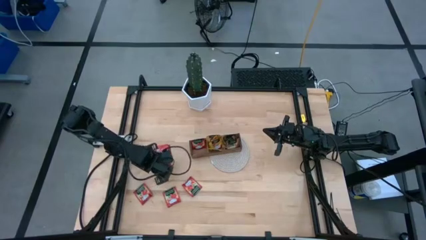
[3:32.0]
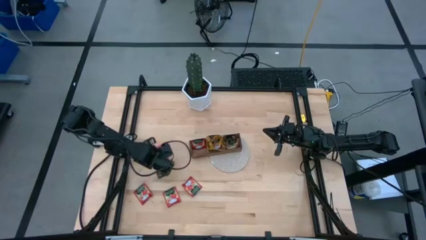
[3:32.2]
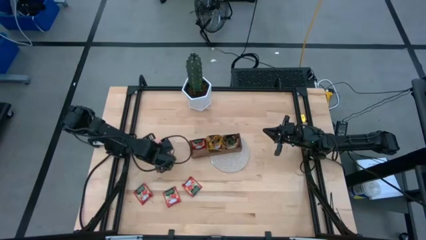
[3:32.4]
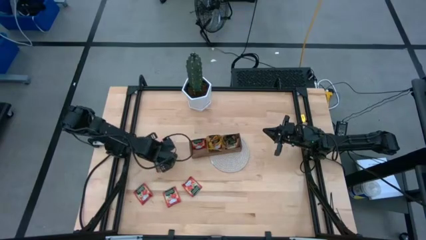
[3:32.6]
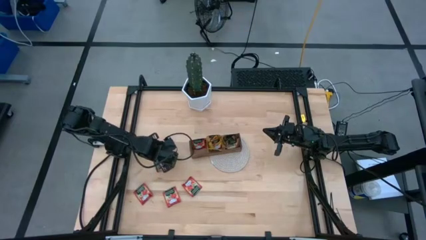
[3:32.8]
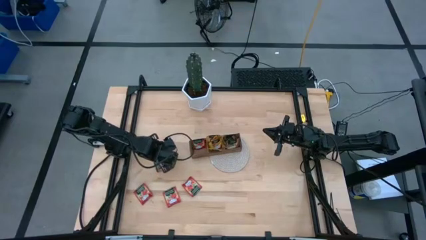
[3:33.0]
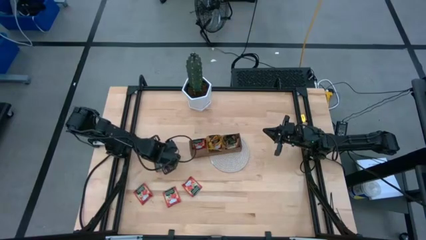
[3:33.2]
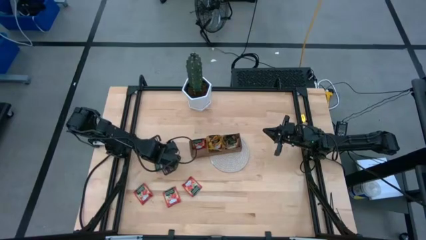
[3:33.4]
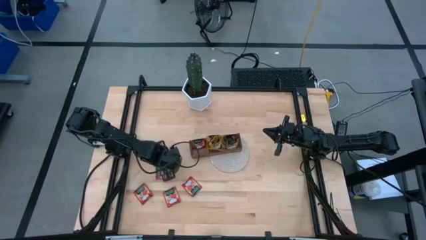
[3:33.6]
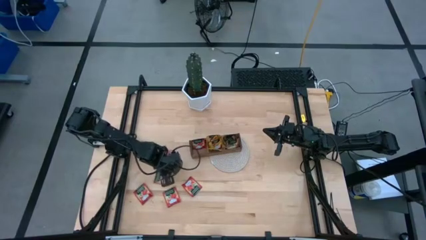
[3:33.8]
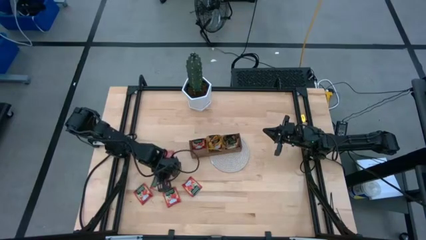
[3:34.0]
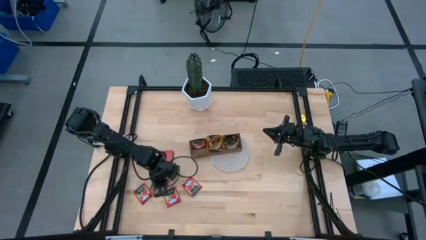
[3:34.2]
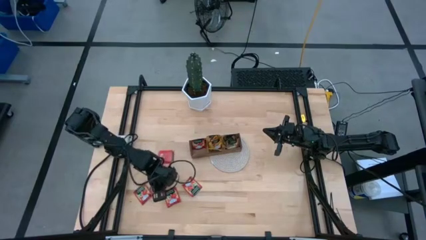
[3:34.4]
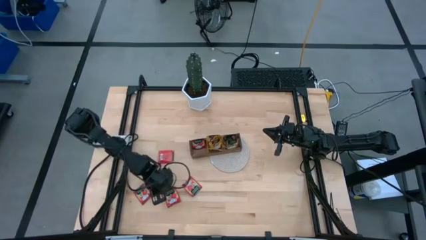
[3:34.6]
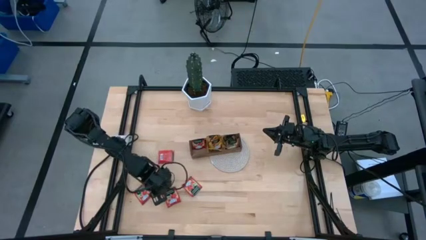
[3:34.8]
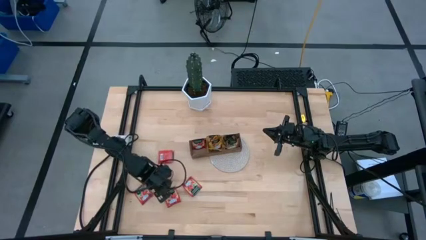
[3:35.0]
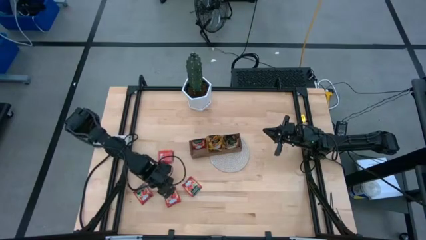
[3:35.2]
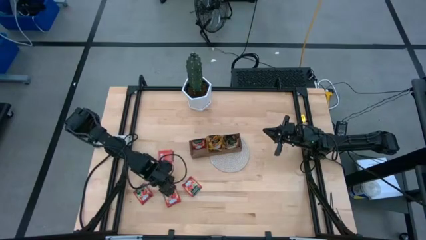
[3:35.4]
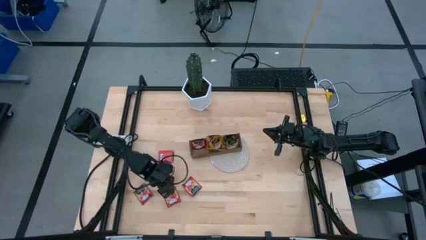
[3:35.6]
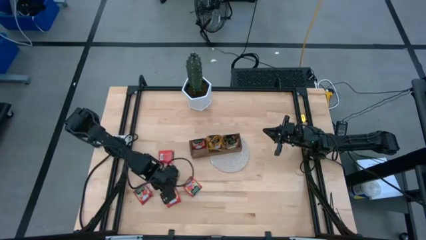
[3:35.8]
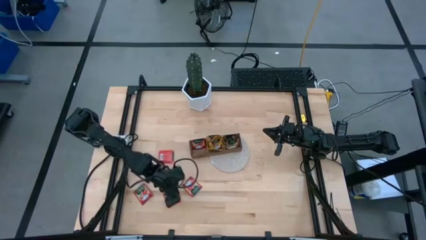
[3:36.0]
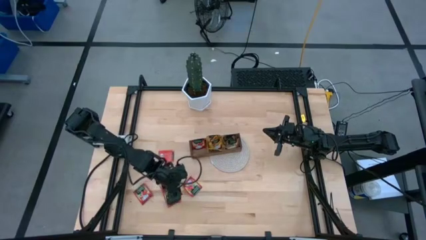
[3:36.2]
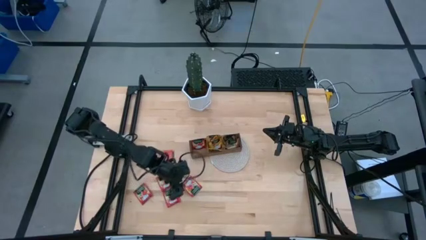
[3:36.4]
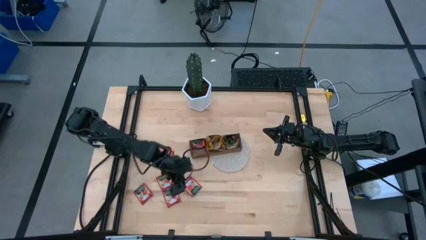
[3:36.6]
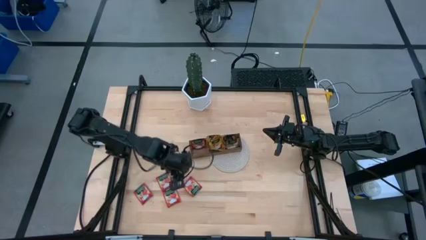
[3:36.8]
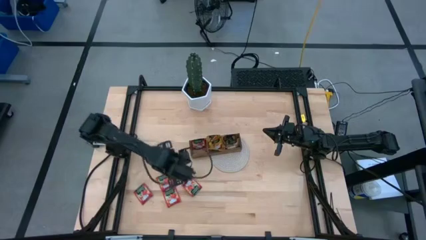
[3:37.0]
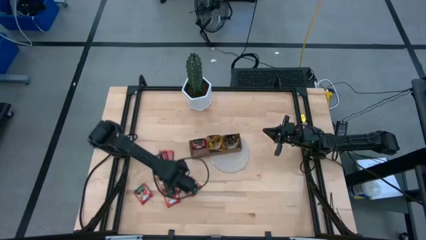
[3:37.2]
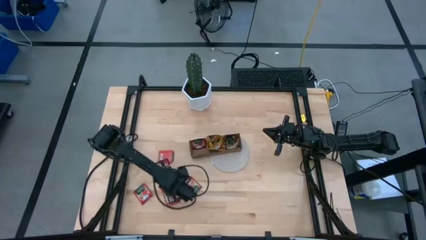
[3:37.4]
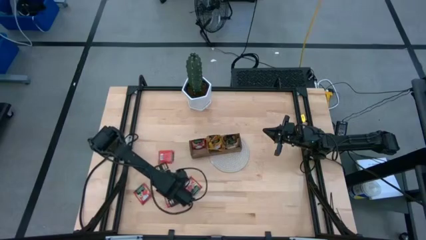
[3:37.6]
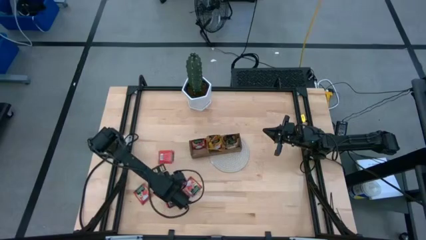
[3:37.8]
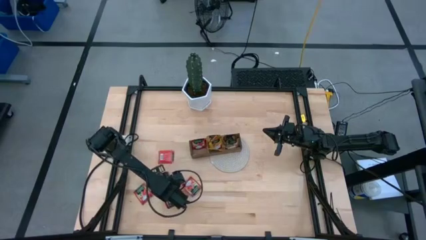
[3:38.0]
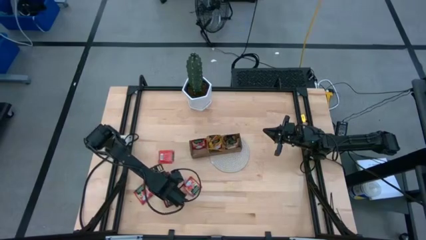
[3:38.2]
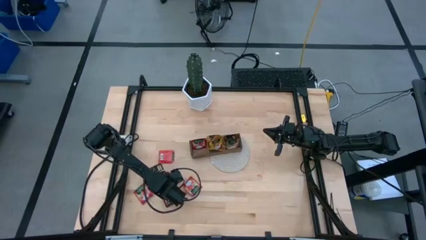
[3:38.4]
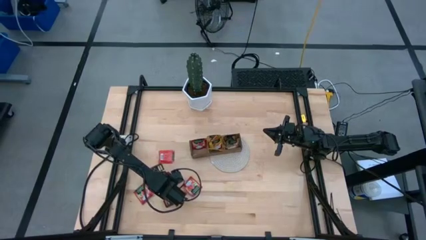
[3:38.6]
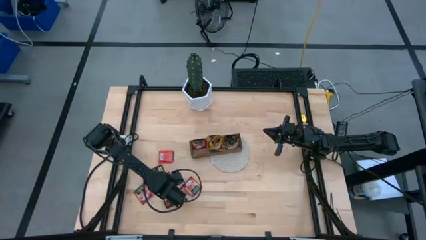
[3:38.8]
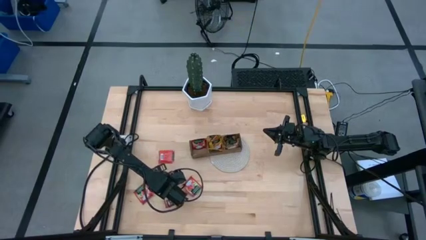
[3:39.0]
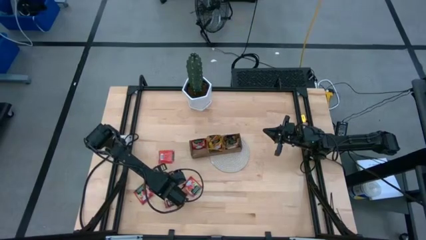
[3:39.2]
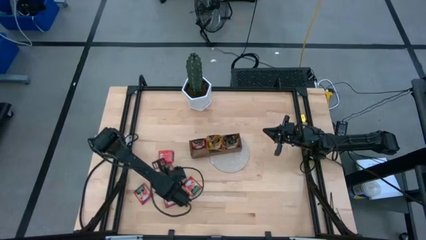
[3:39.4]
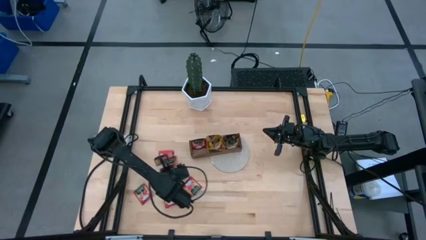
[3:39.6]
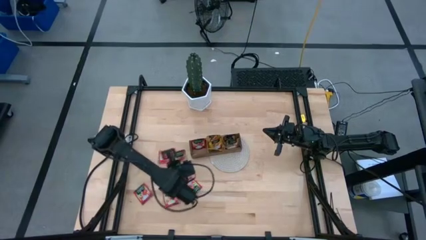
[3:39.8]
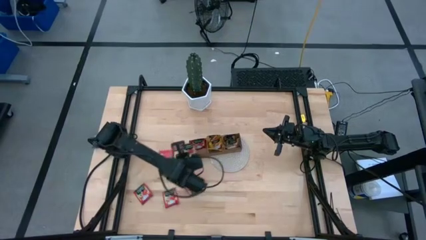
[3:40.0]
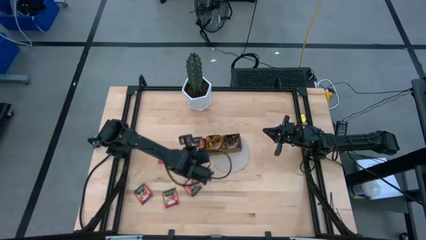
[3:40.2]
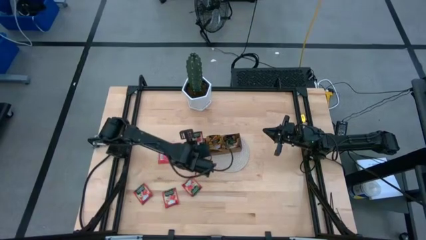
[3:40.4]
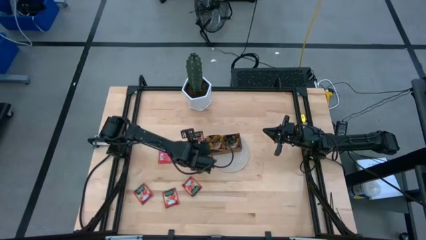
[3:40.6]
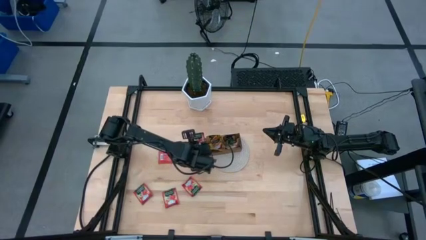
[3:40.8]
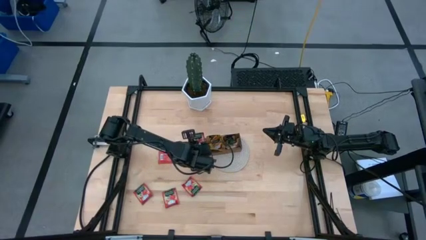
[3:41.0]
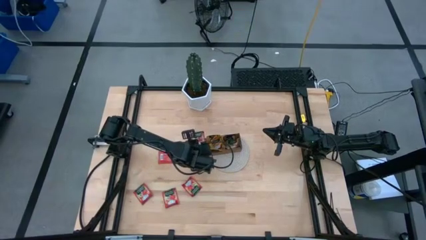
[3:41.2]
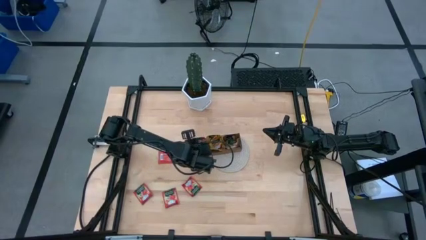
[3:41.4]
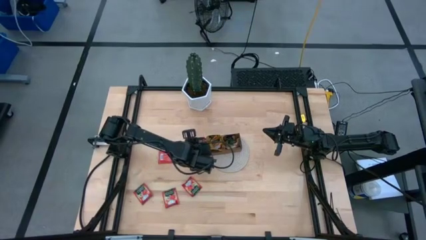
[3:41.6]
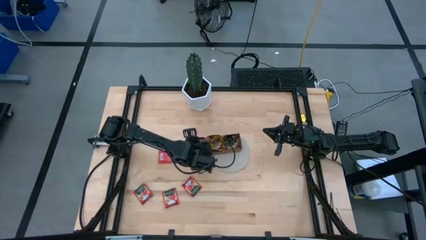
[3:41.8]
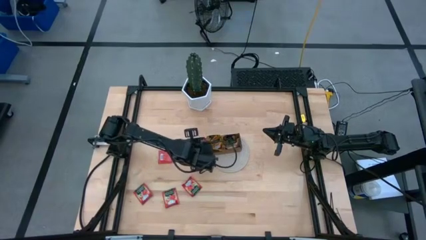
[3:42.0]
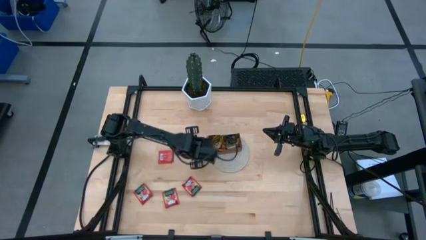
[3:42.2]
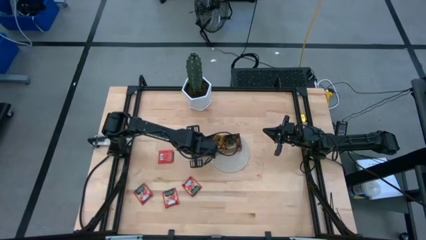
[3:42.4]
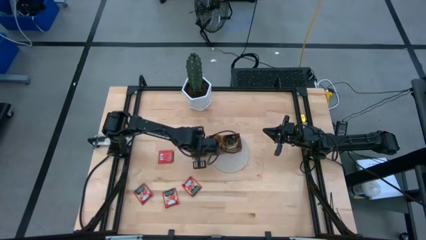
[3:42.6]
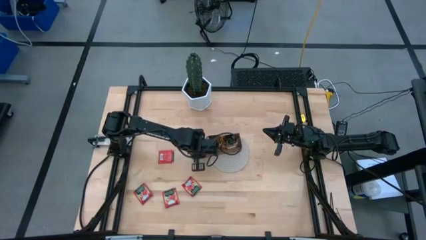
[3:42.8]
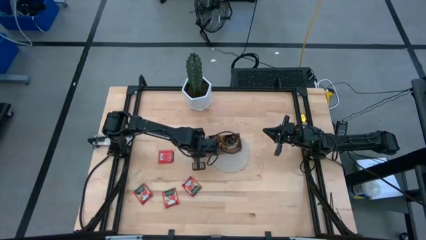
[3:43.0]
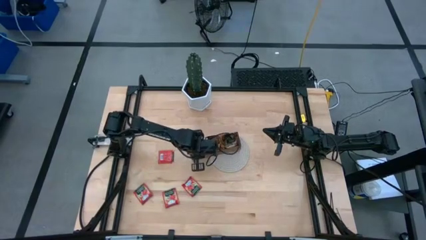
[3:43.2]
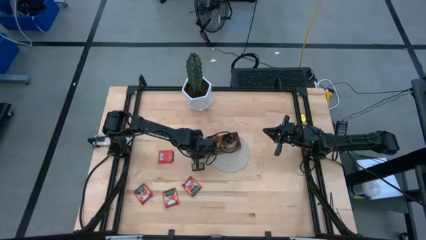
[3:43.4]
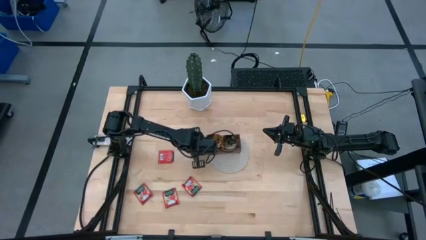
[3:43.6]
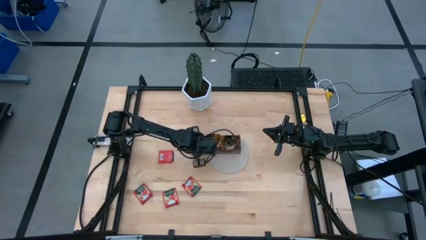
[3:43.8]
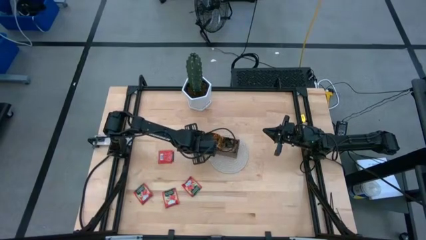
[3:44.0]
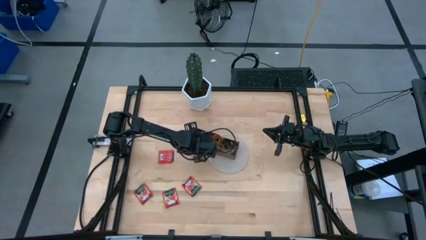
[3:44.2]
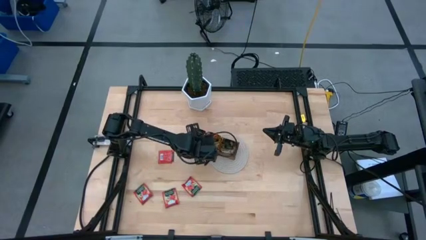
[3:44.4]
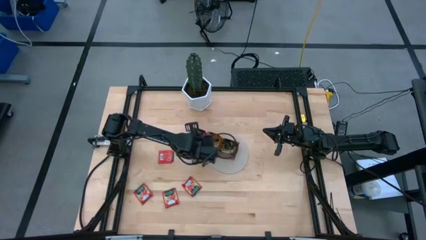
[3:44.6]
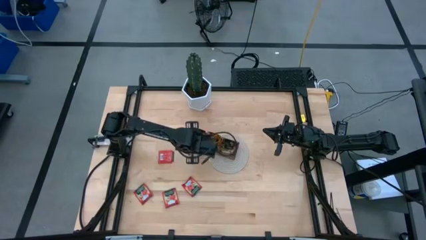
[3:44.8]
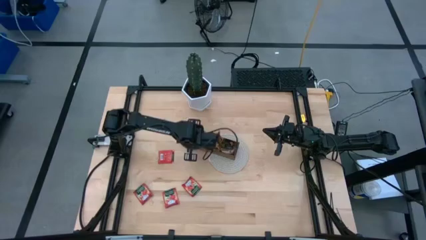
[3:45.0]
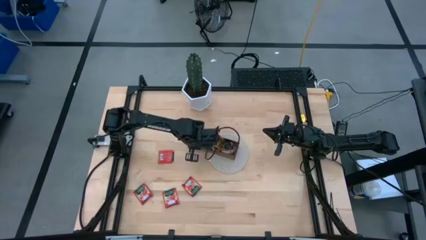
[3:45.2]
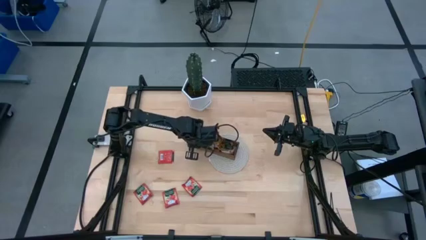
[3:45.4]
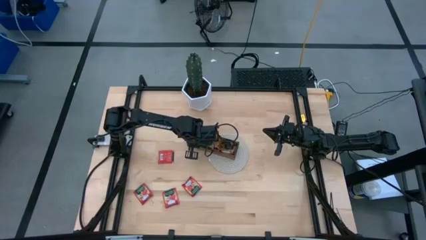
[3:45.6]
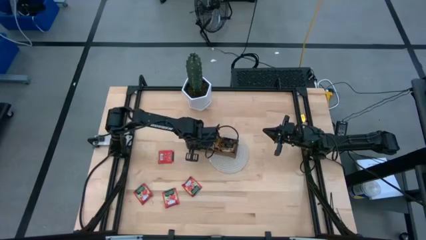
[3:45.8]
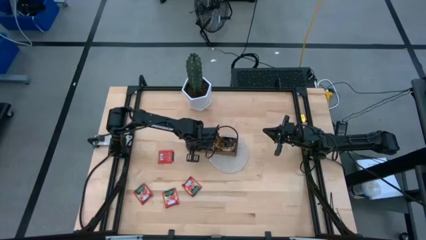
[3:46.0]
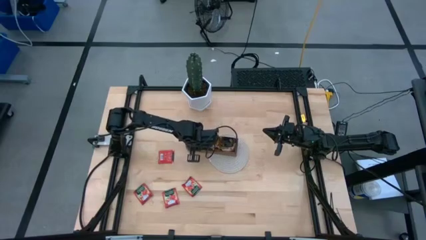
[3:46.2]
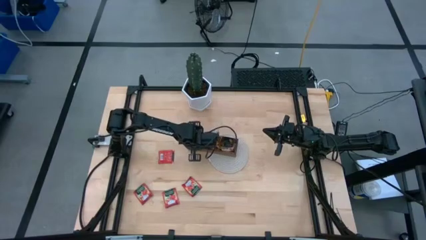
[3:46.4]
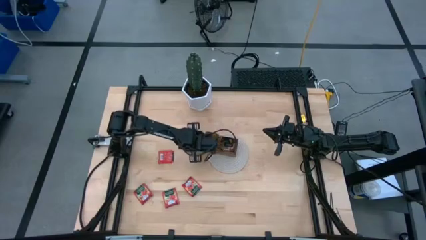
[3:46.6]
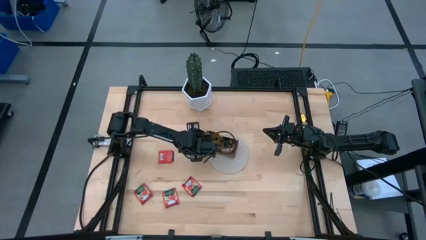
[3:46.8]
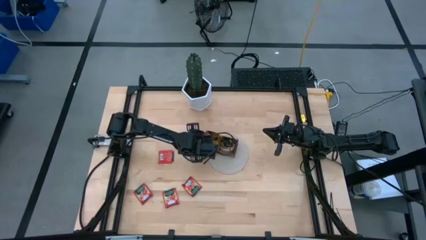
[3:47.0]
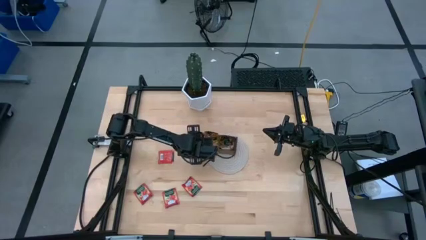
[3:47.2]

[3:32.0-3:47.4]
Task: Pick & Place Tea
Put the red tea bag into the left section of the wooden organizer

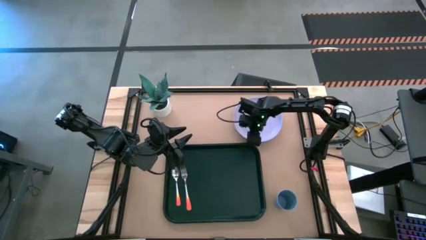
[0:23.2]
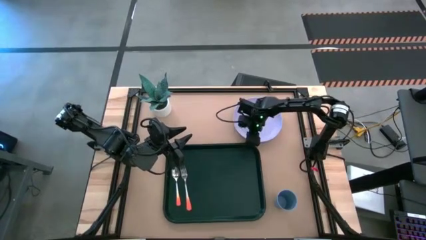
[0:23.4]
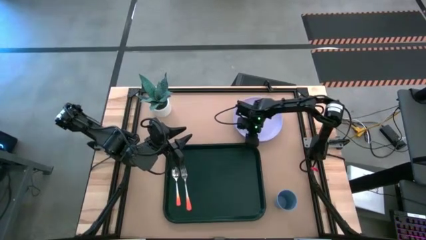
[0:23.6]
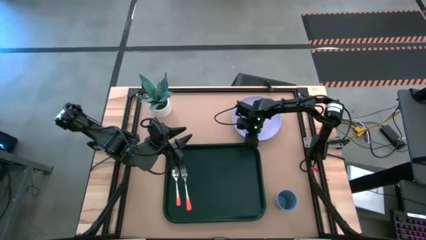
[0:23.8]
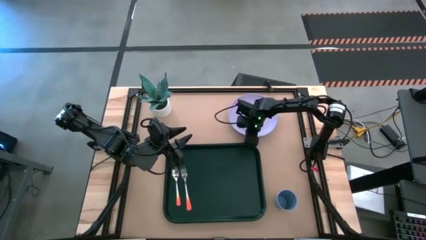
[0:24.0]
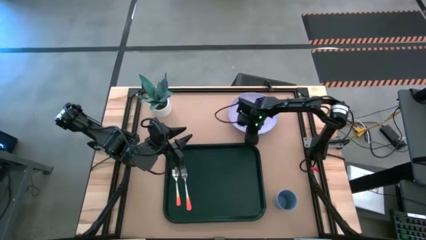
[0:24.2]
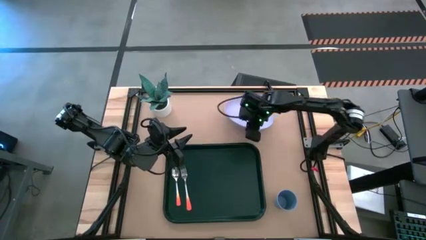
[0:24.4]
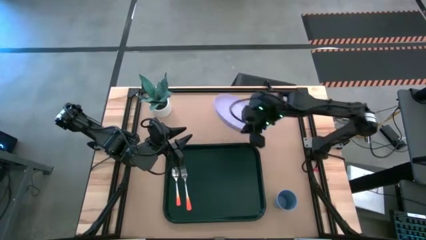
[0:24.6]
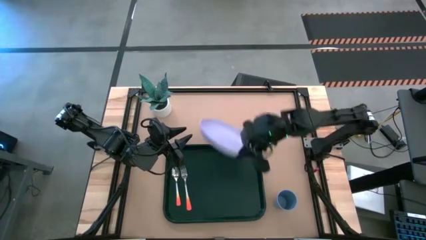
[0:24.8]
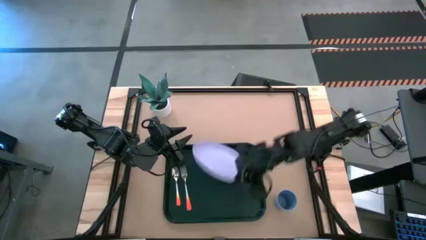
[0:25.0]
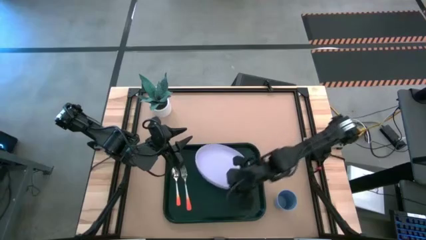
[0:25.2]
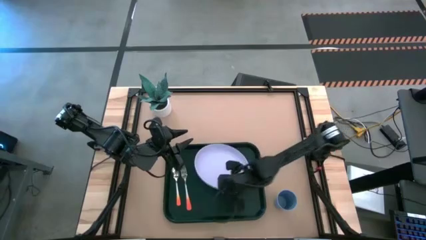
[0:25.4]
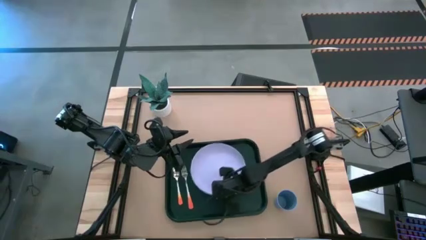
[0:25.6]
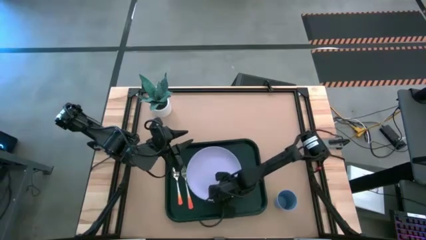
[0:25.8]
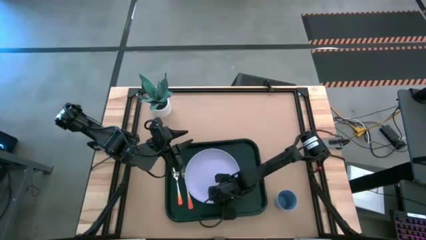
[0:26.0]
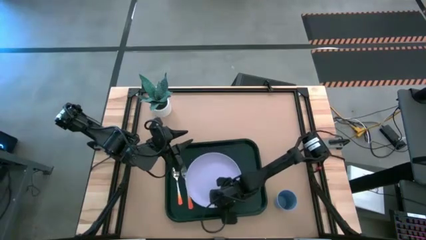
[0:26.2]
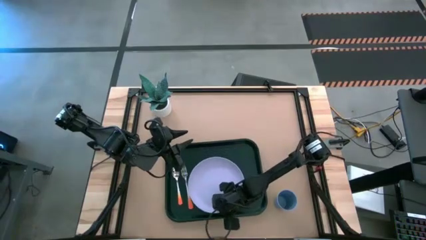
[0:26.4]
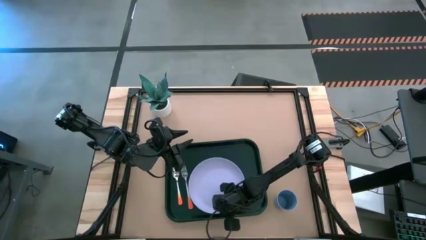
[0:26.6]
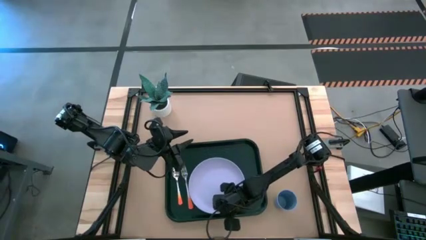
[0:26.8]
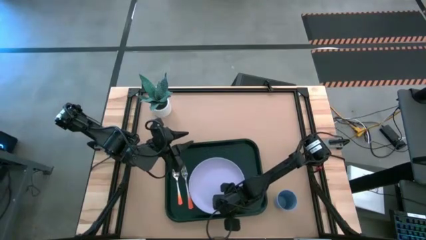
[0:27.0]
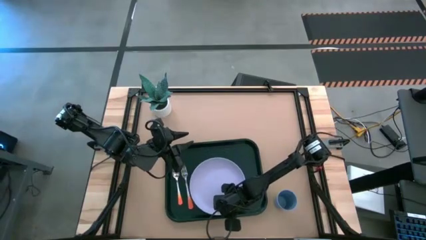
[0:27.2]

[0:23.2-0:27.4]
Task: Pick and place plate/cup/fork/spoon on tray
Put the white plate in the bottom center of the dark green tray
